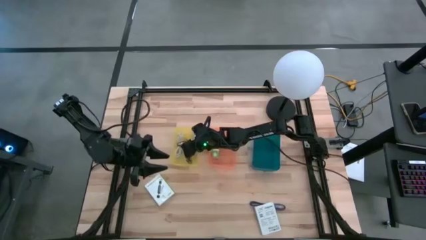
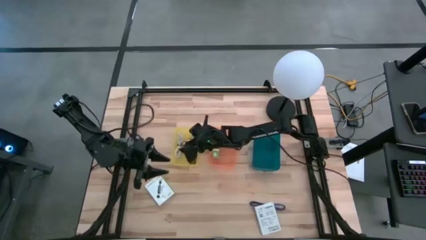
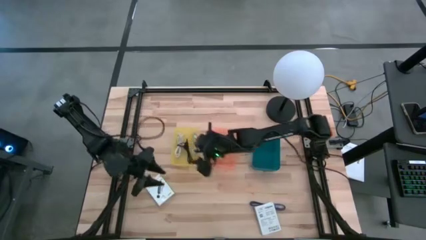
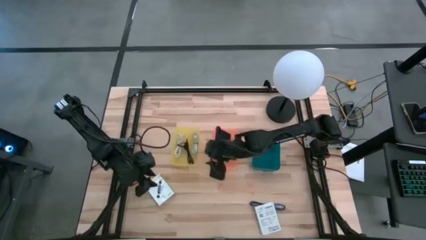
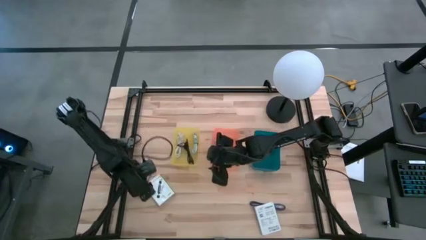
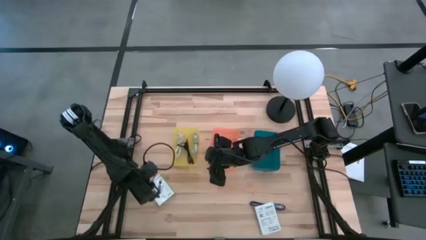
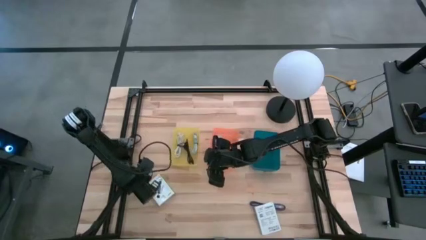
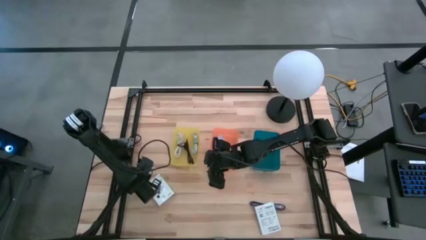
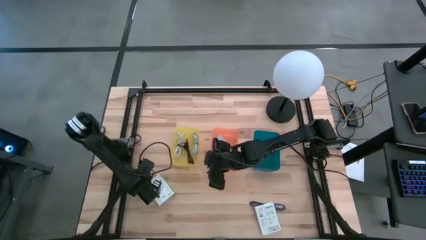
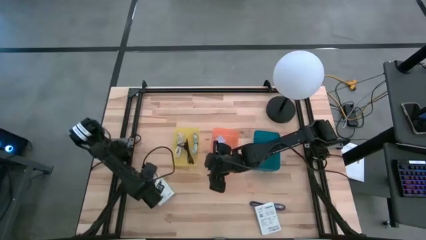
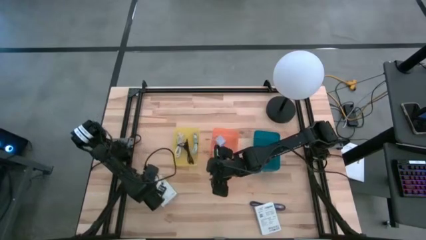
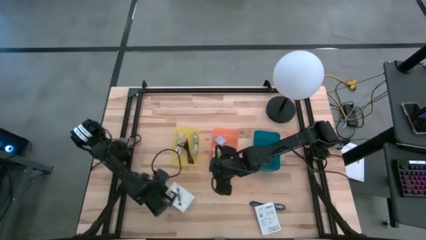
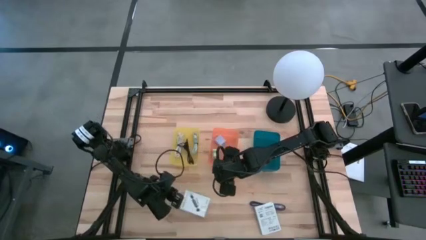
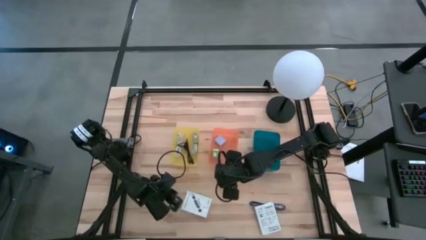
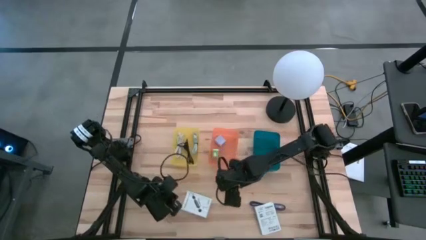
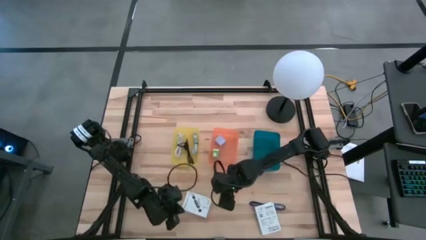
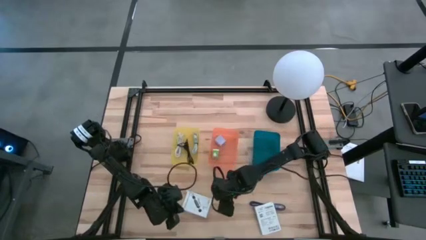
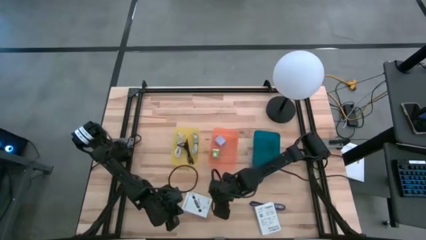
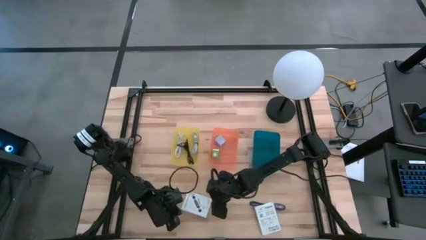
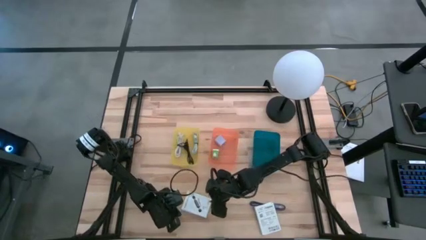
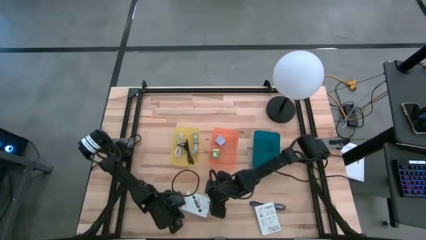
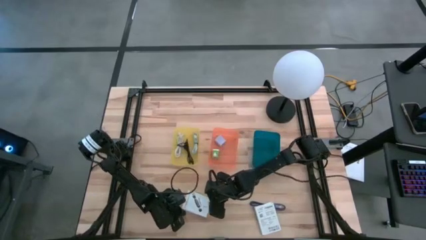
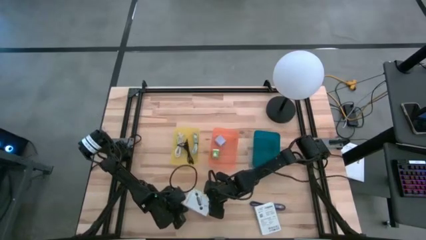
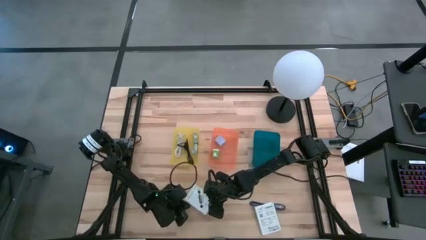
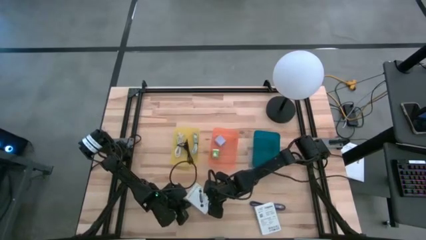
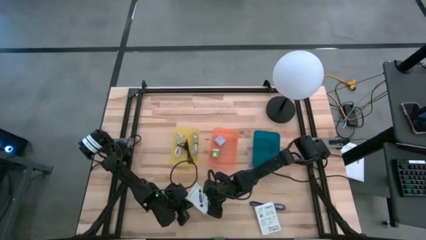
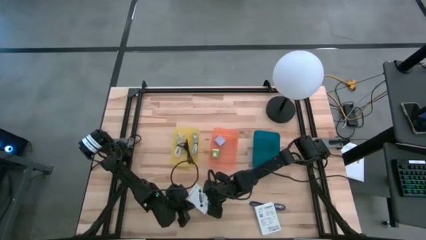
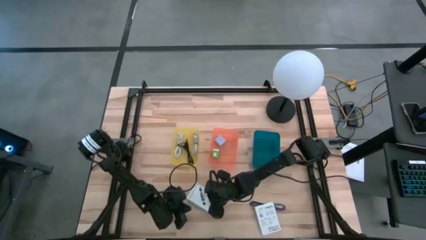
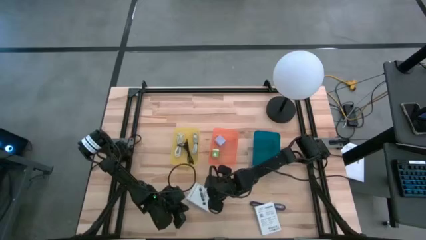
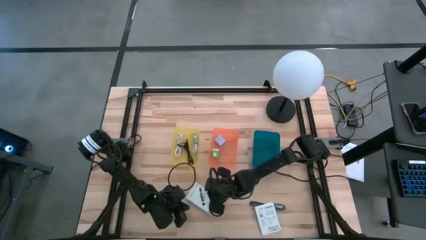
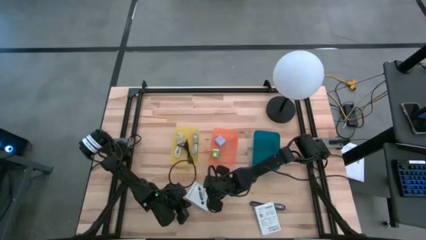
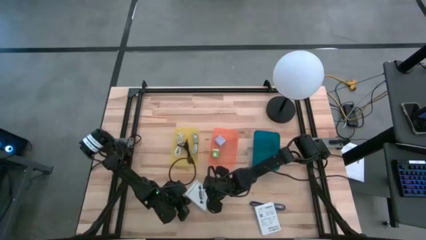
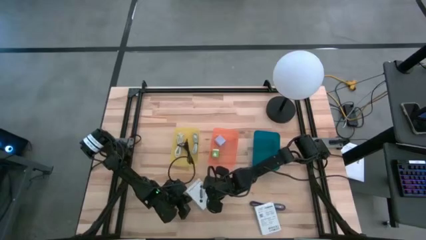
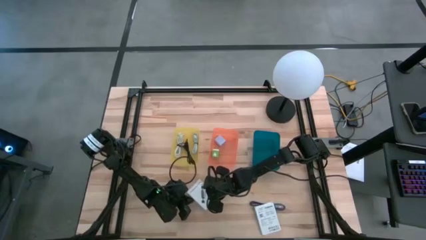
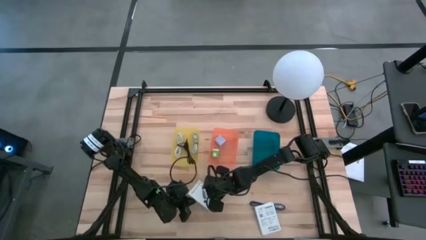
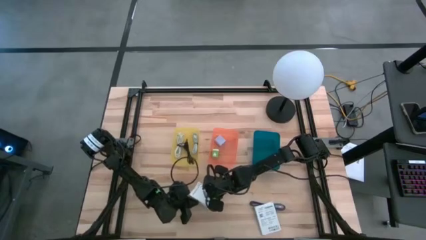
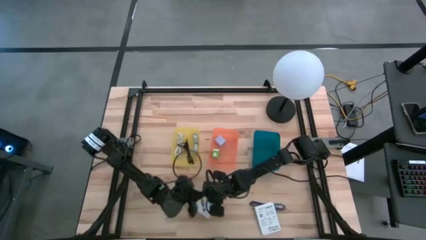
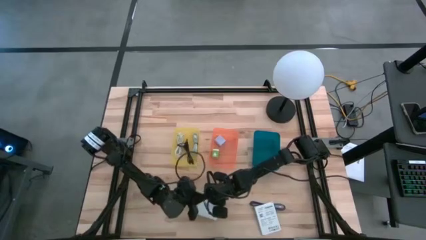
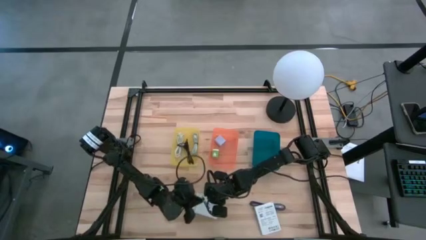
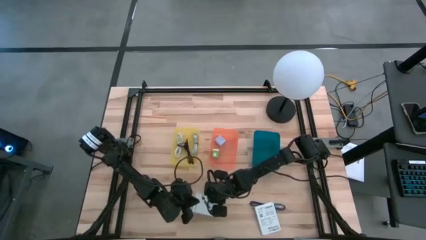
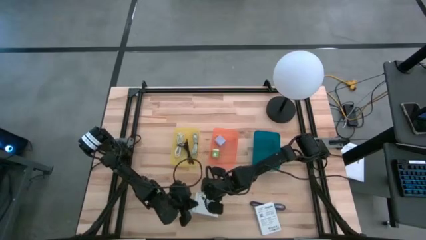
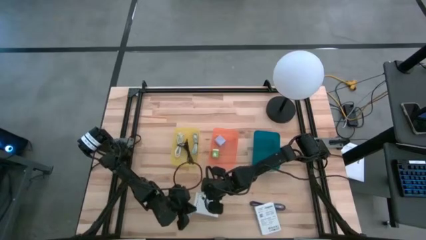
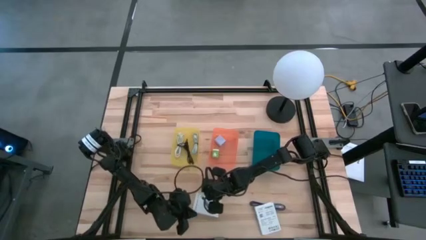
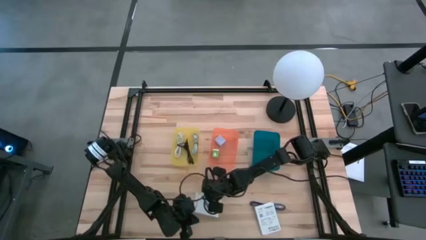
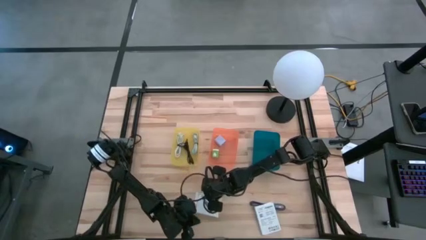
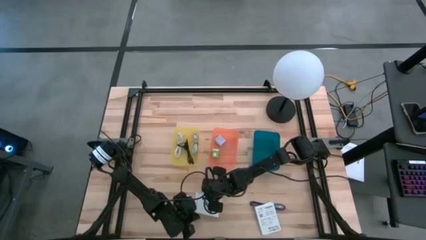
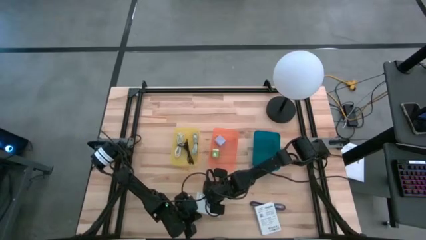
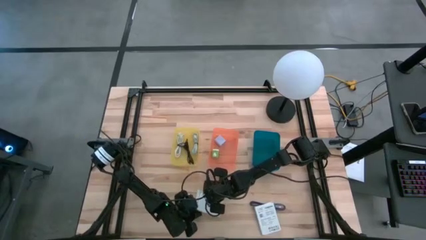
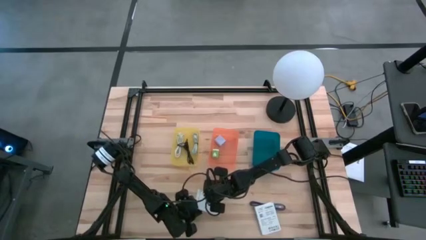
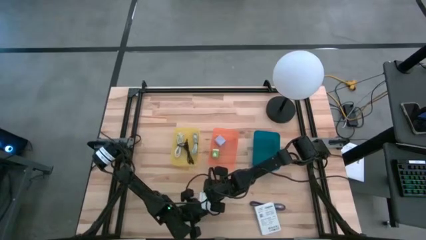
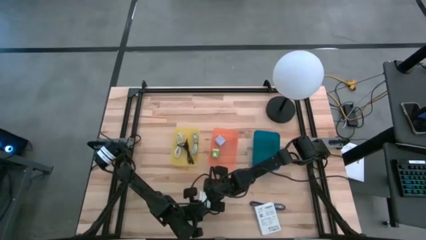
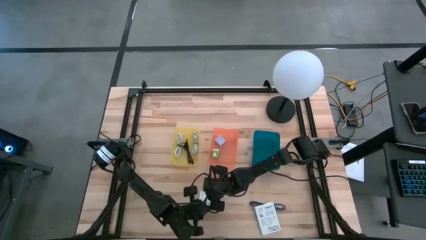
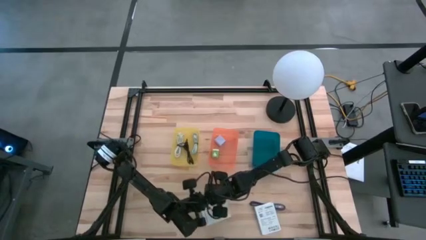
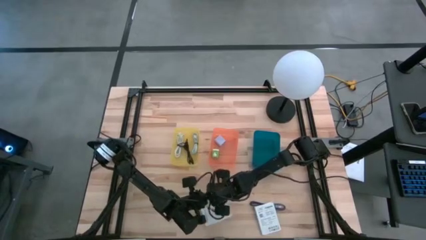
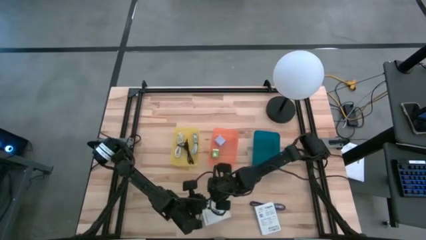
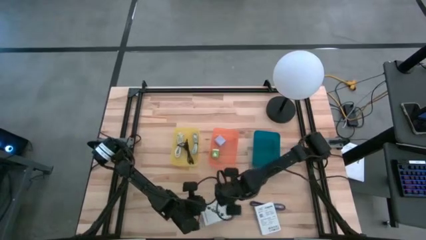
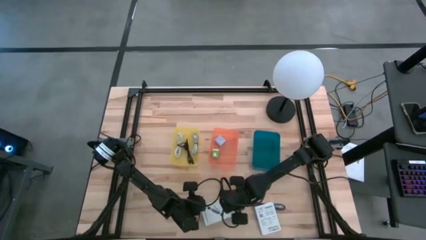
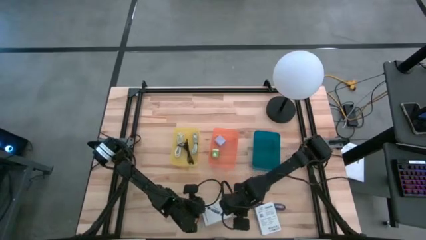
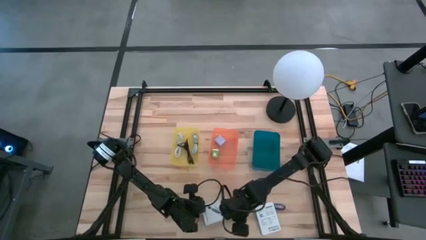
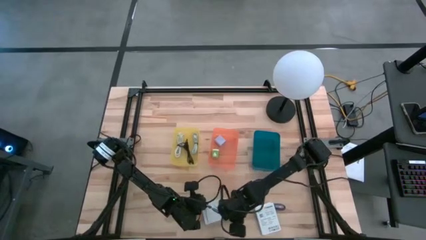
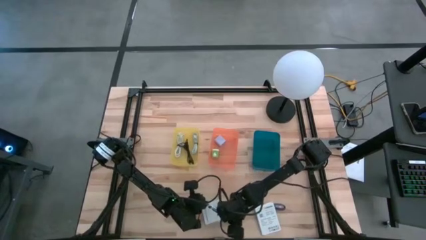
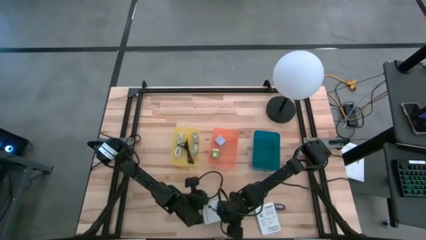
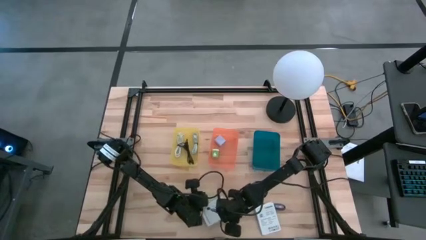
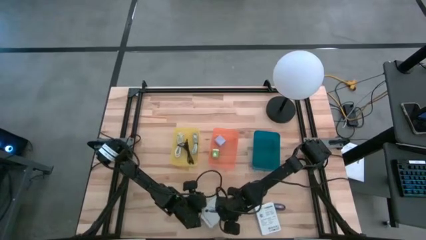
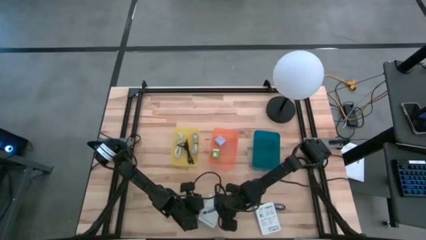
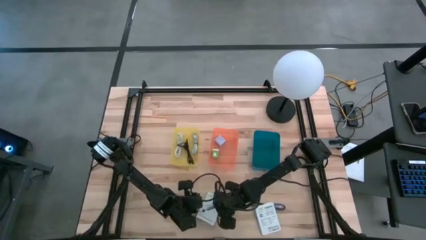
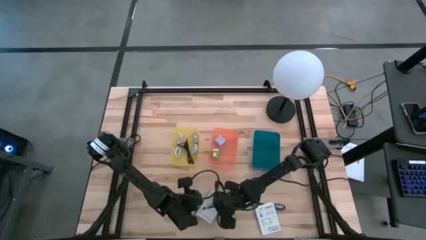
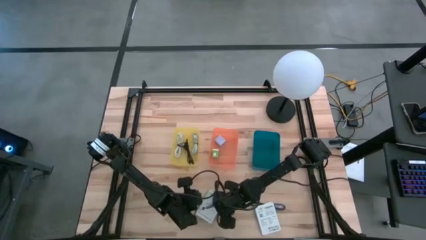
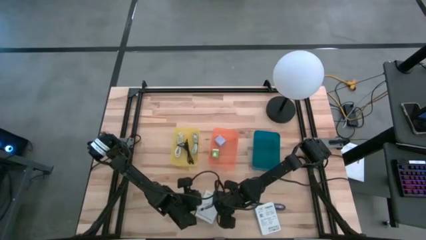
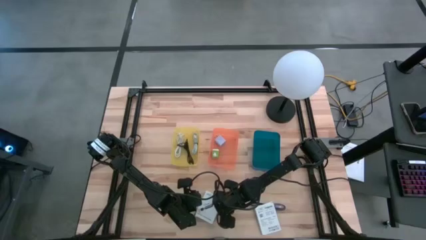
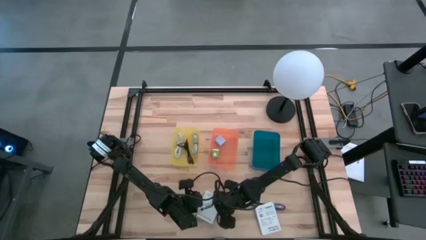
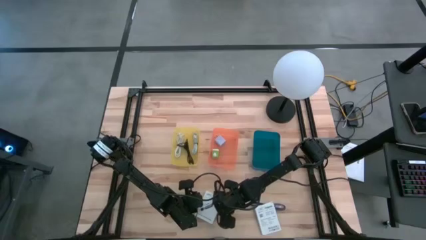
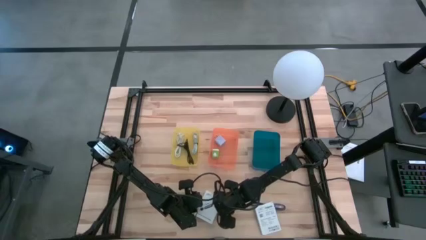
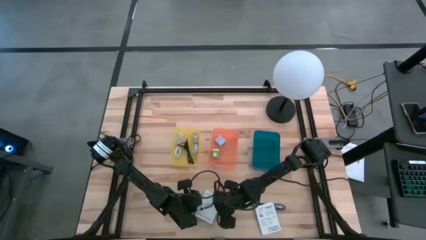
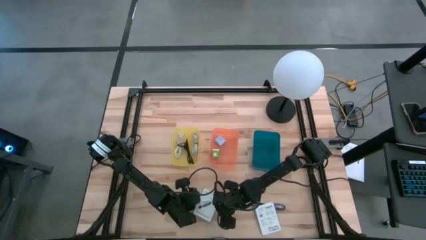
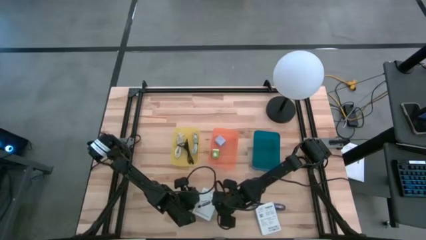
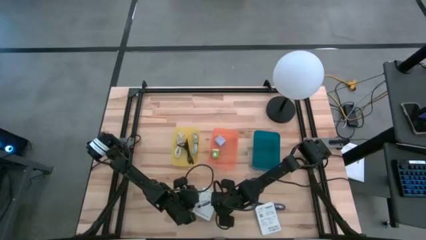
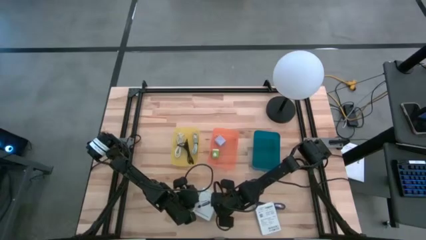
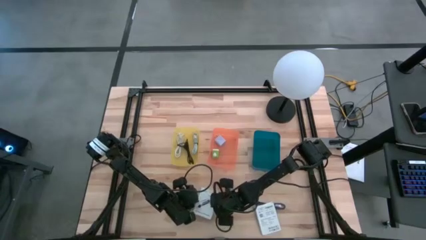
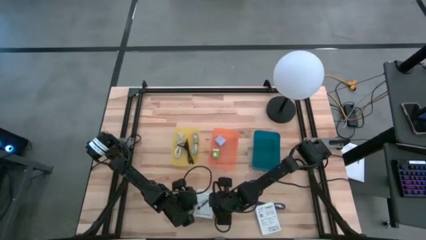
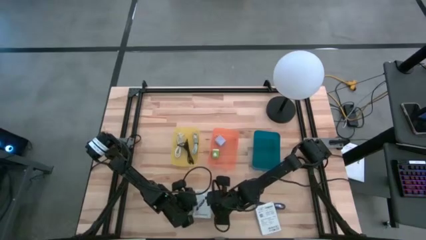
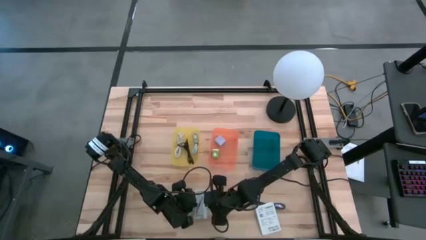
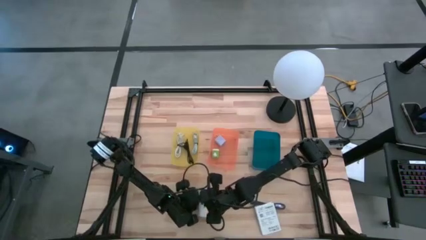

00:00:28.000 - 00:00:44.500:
Task: Pick and place items into bin
Put the top white card reader box into the blue bin
